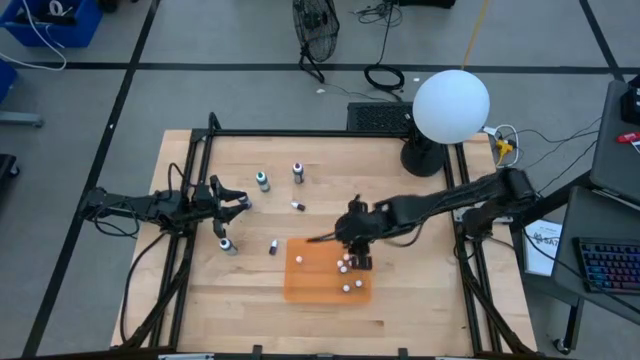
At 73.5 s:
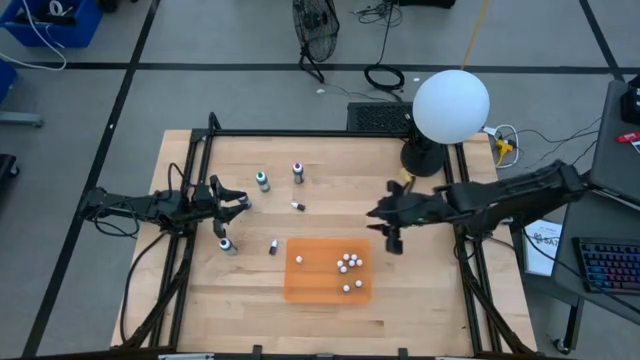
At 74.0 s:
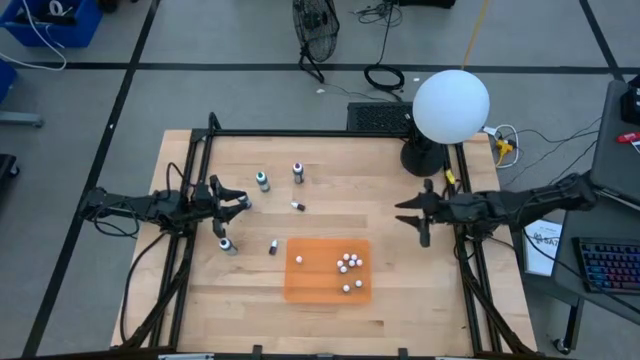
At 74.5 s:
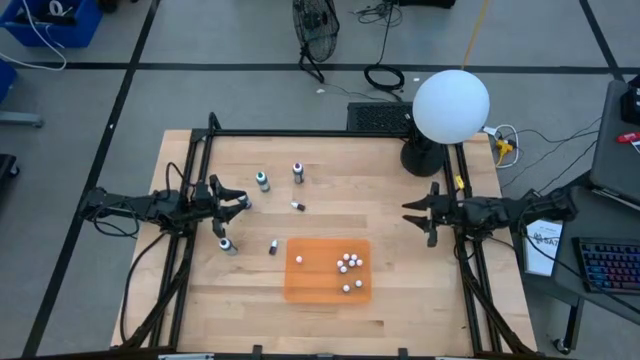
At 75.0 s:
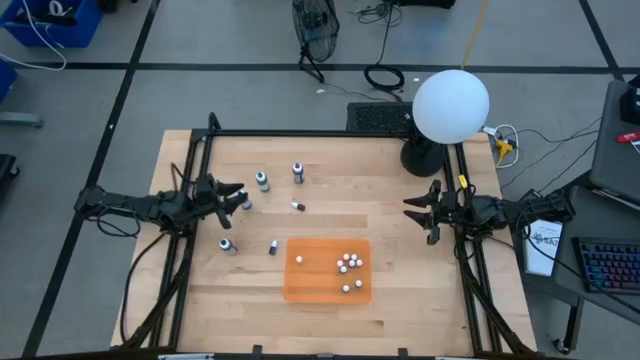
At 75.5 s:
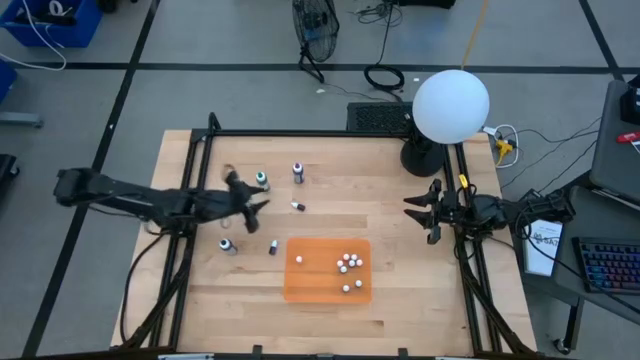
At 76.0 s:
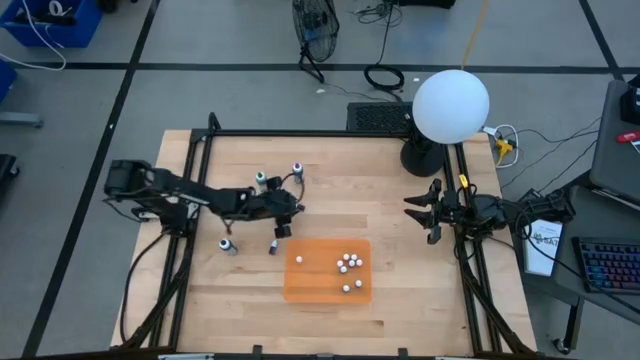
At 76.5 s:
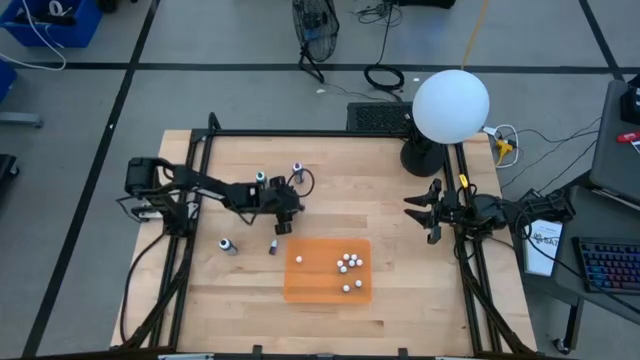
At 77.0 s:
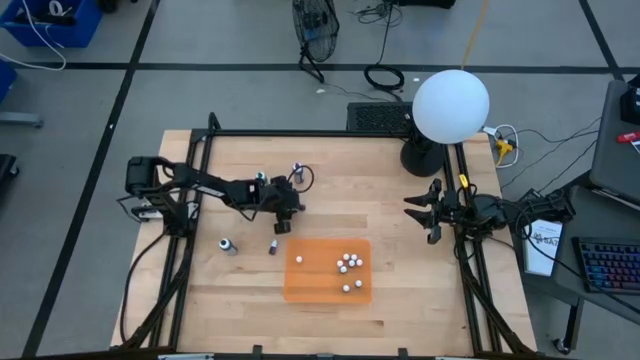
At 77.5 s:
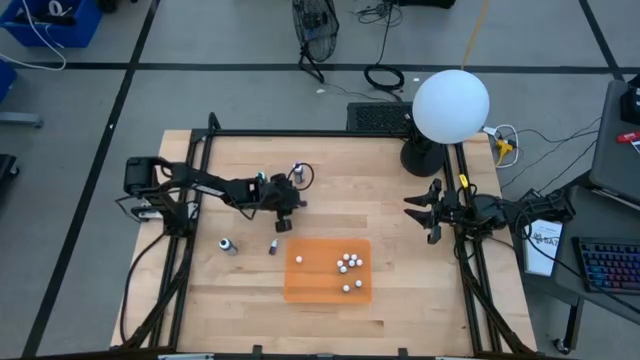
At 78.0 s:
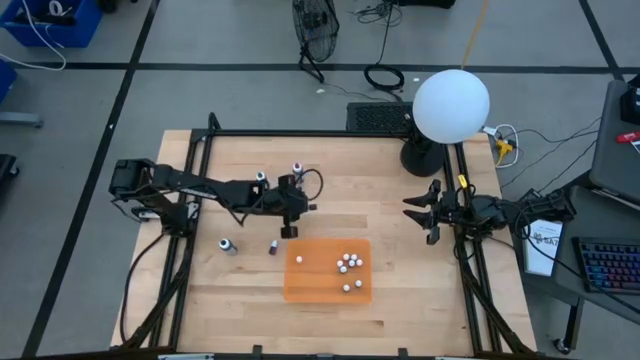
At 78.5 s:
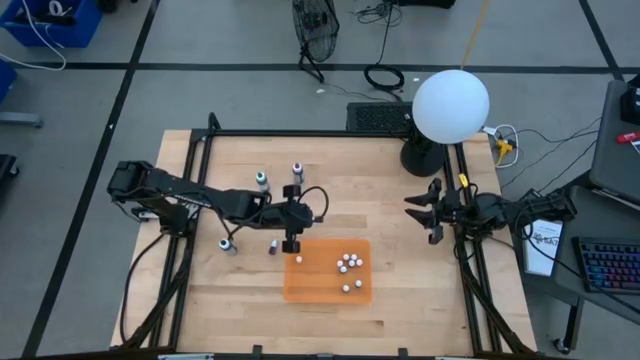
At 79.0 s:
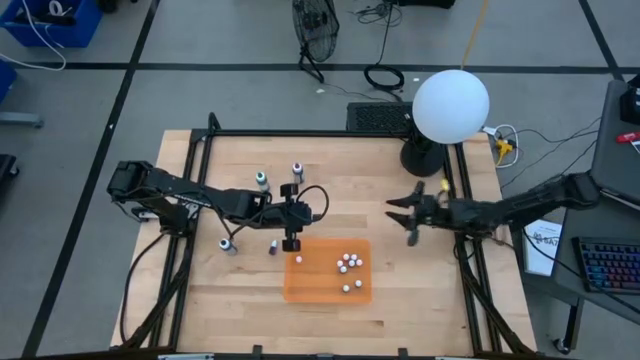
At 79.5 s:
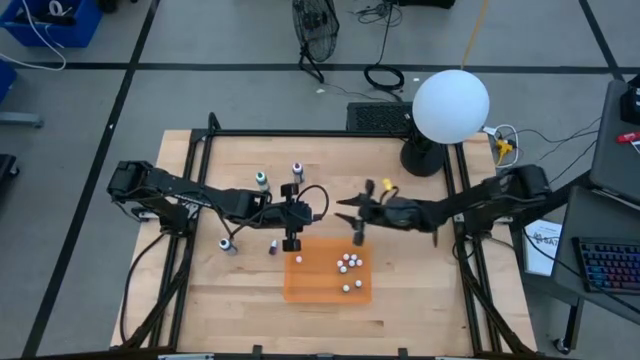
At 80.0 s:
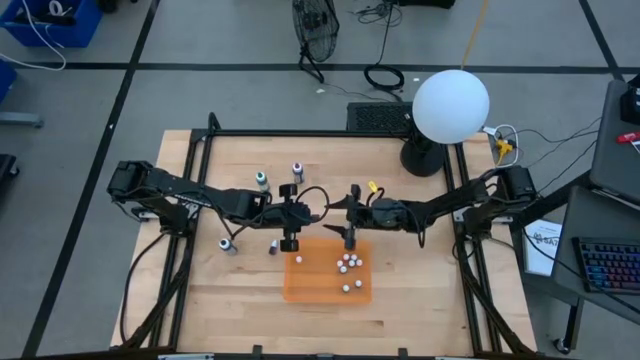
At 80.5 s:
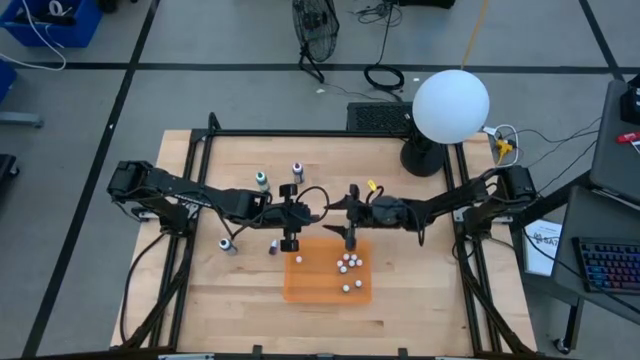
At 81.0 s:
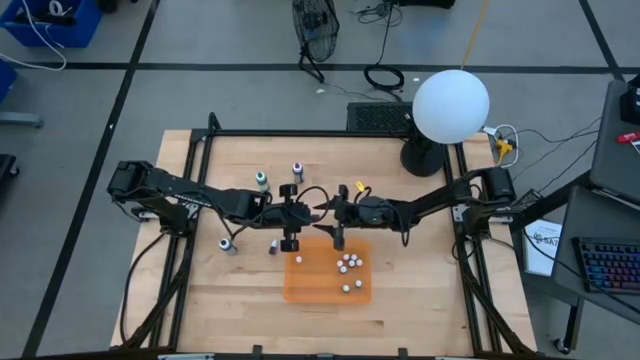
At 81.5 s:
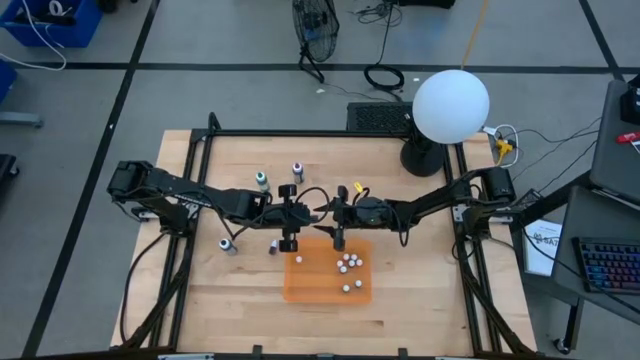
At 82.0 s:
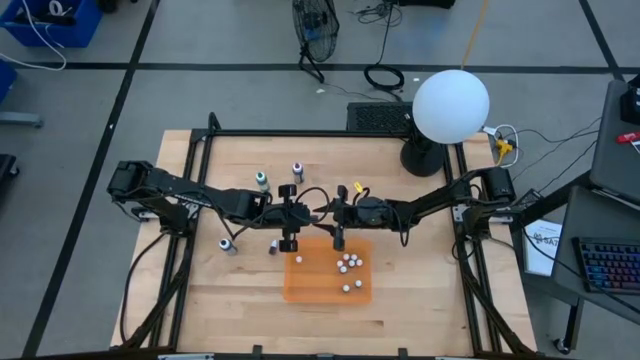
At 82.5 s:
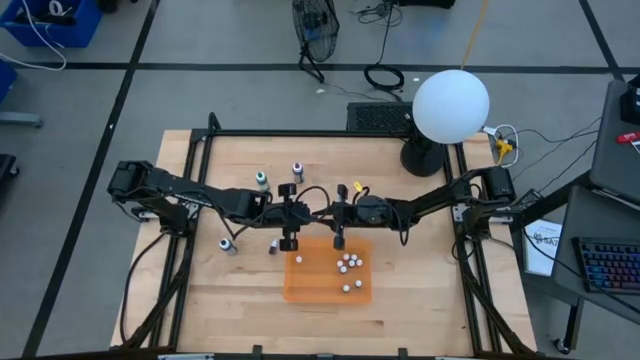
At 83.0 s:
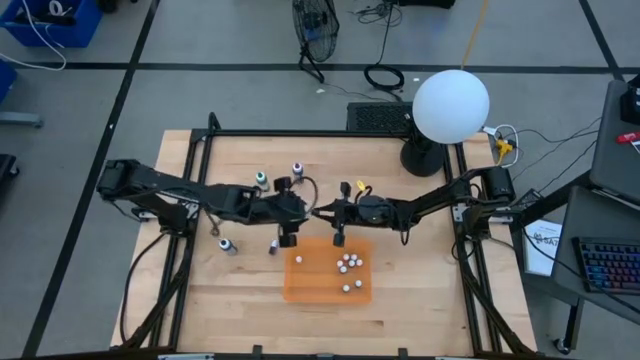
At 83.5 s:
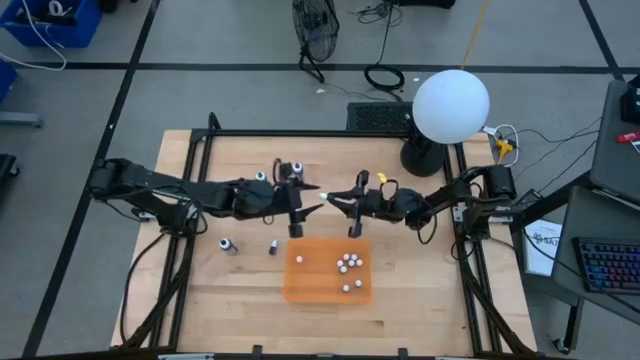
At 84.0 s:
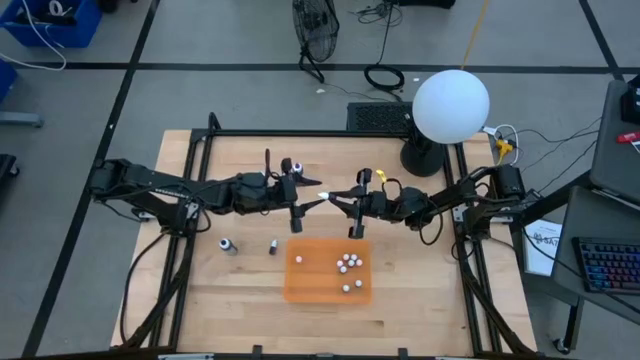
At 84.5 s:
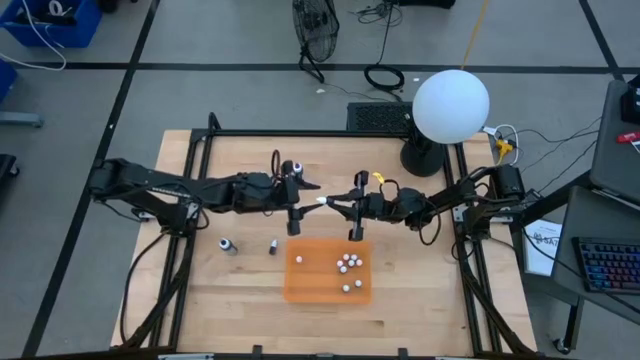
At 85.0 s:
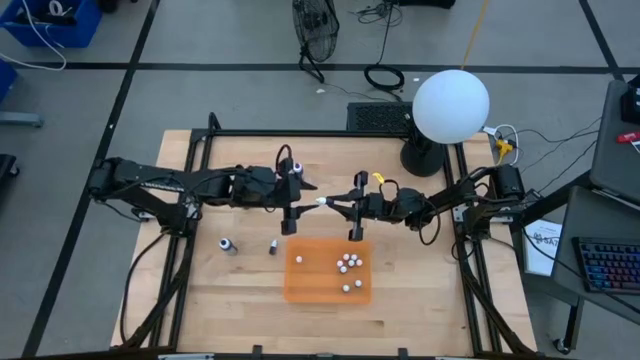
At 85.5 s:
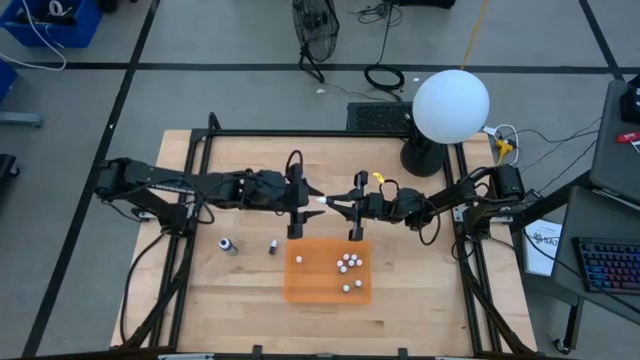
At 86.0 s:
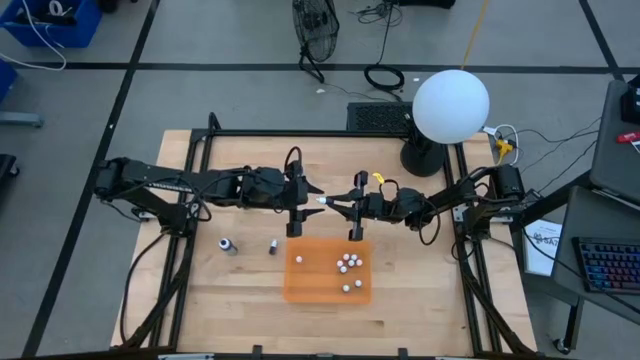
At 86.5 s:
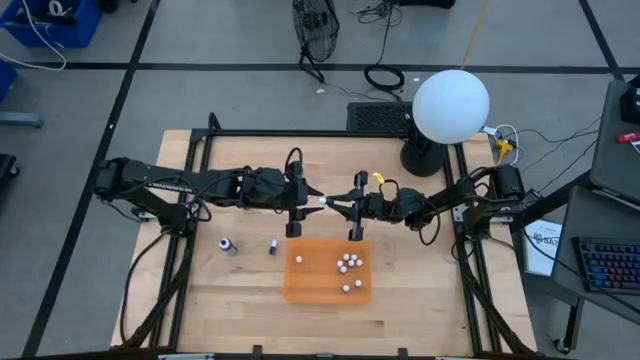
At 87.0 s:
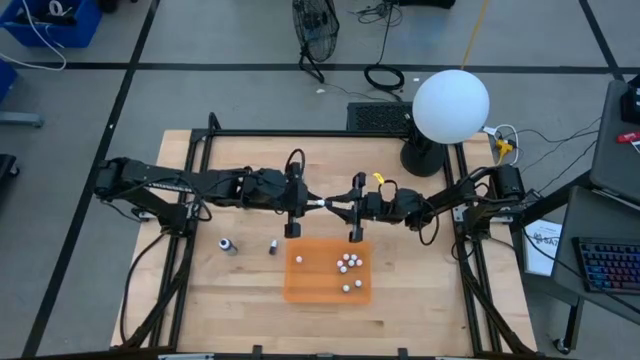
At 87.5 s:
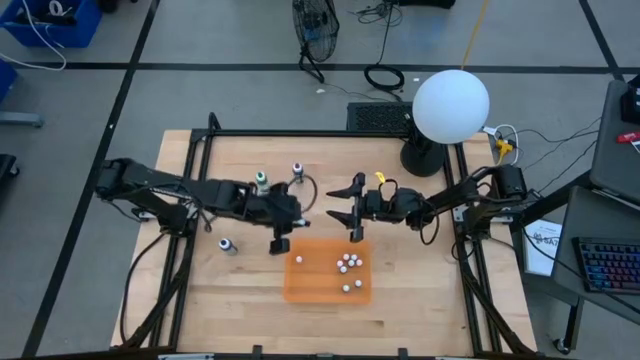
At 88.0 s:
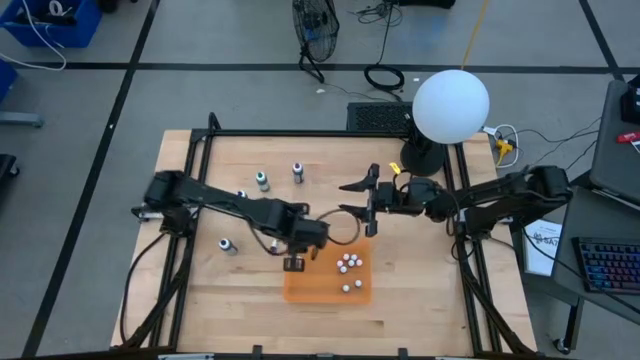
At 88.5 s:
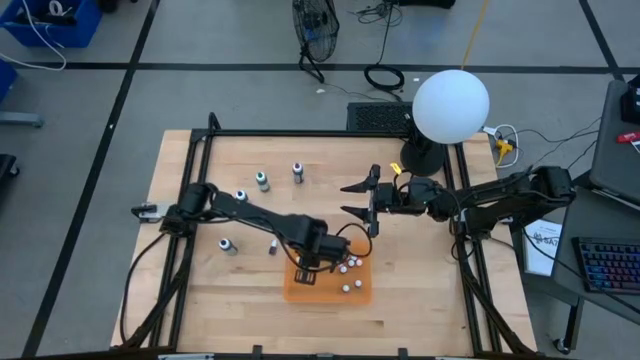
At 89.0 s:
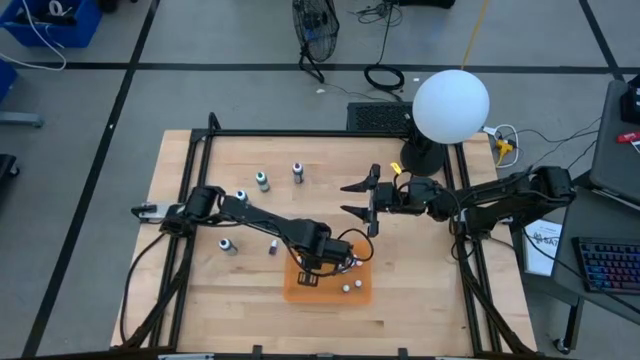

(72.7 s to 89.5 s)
Task: Pick & Place food coloring
Put the small red food coloring bottle into the orange bin

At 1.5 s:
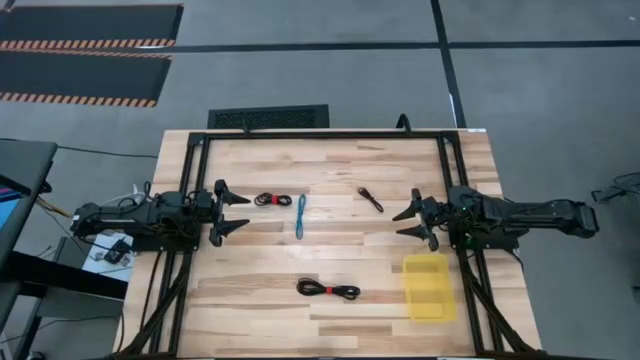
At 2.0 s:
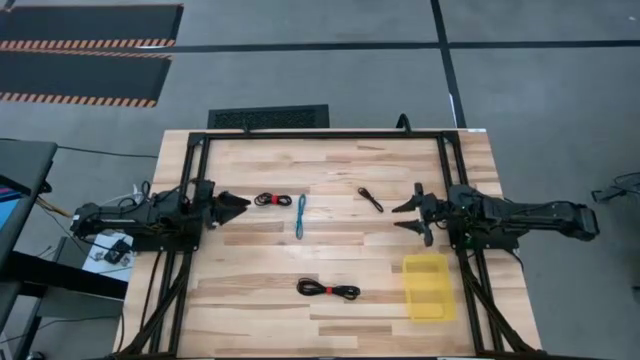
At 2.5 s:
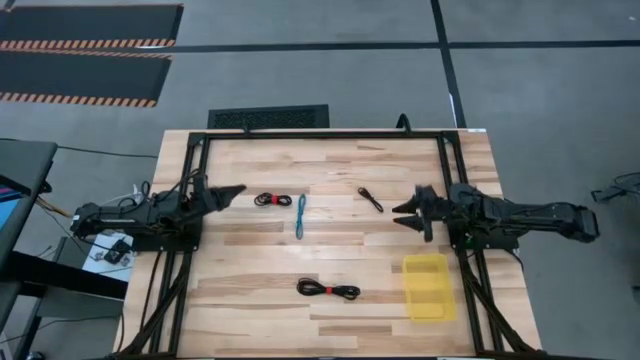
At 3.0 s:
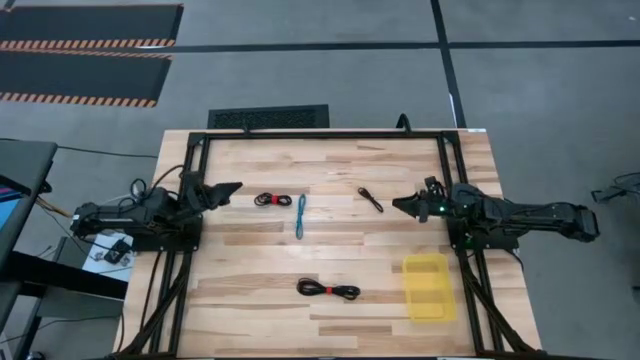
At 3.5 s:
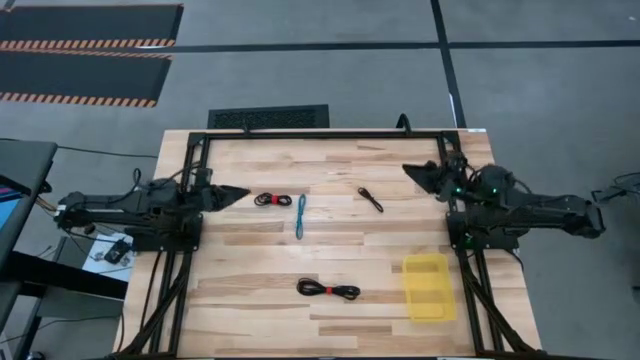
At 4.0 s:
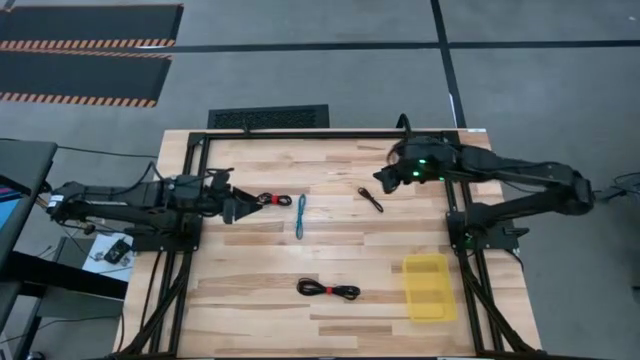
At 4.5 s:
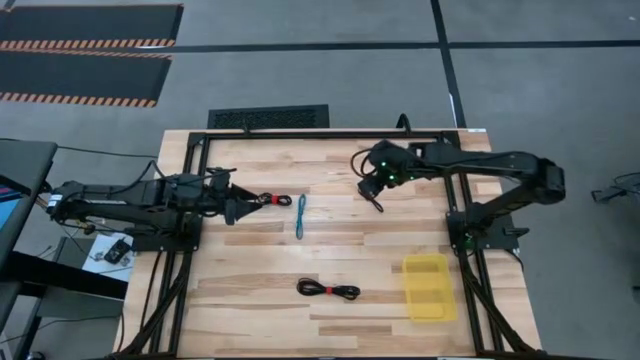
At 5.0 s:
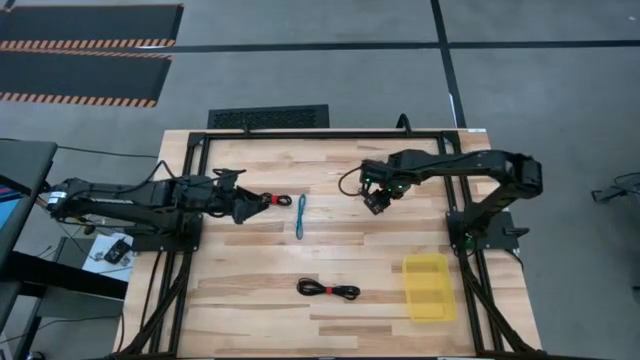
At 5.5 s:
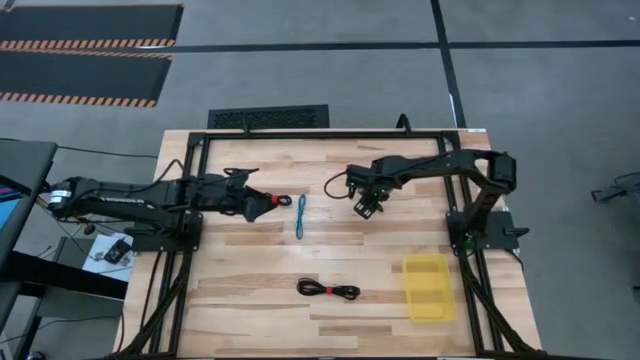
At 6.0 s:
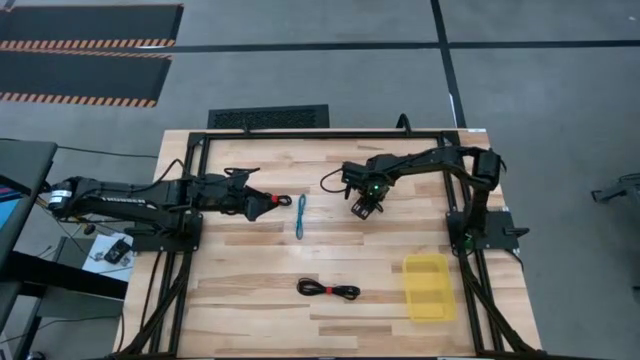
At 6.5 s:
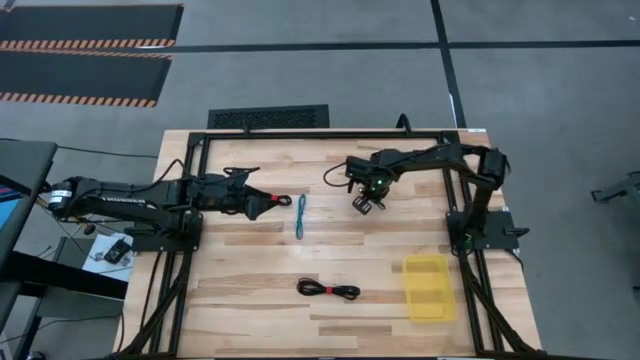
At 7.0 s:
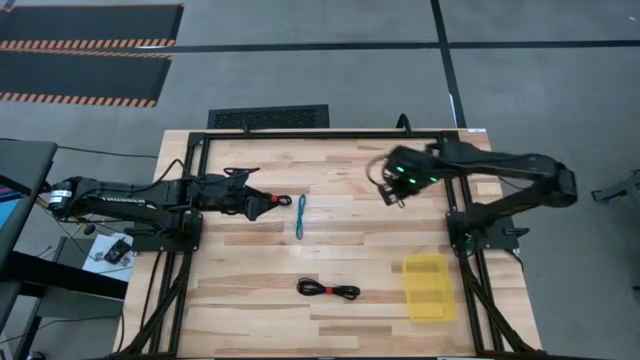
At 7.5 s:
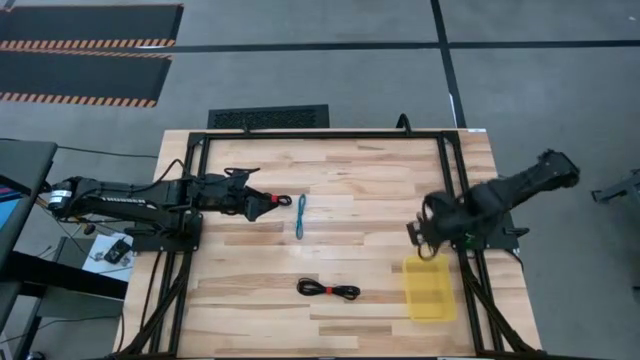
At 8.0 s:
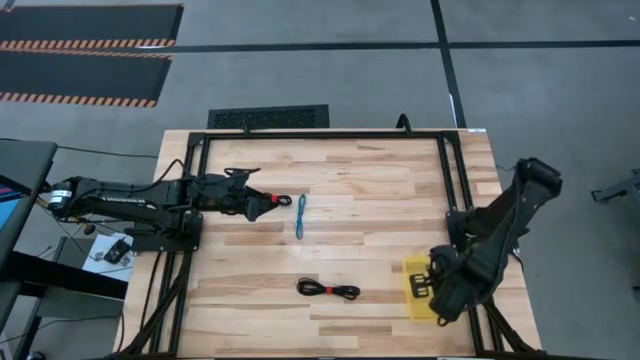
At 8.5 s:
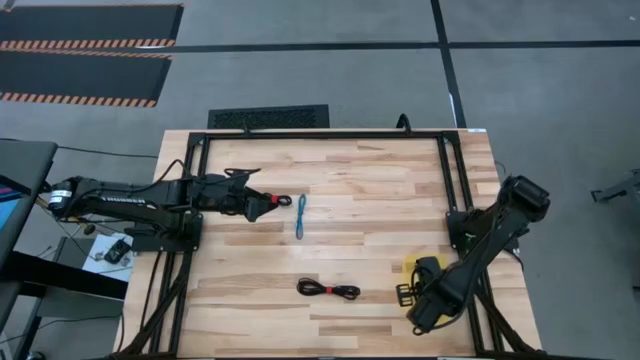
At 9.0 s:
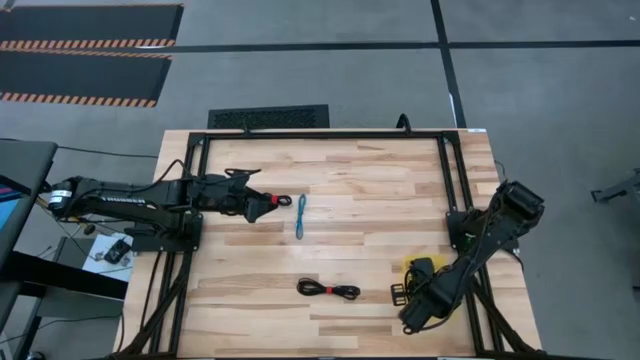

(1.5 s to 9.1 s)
Task: Pick and place USB-C Cables
Put the top right black charger cable into the yellow bin
